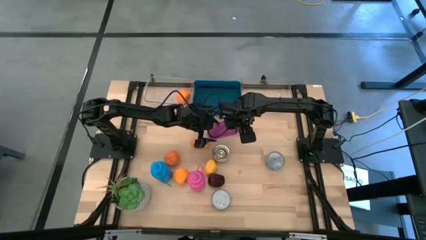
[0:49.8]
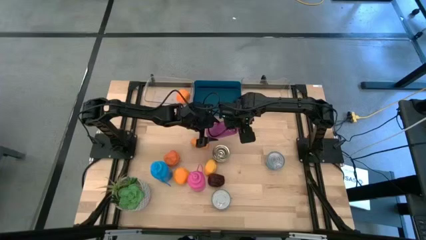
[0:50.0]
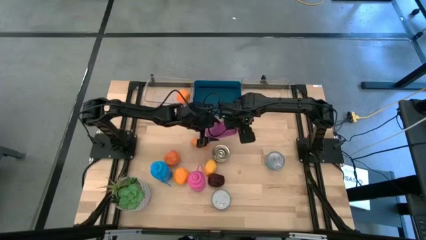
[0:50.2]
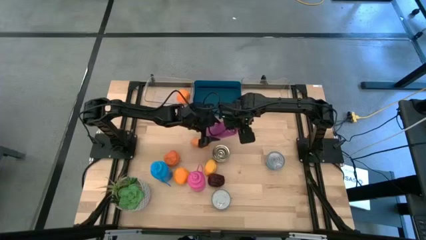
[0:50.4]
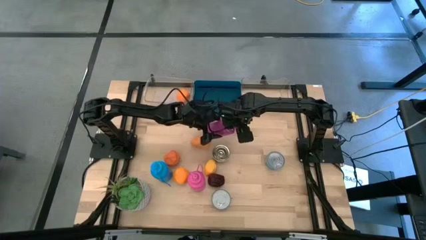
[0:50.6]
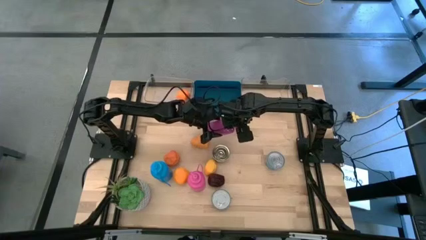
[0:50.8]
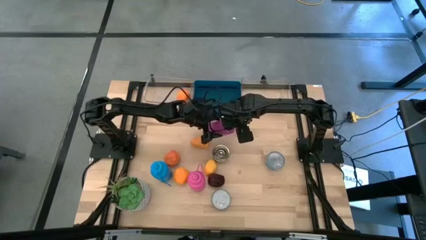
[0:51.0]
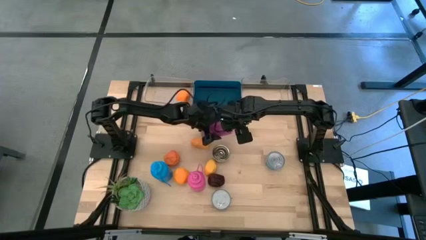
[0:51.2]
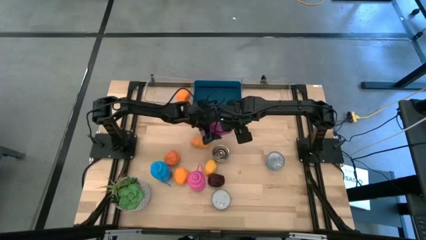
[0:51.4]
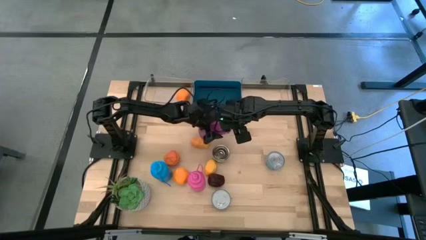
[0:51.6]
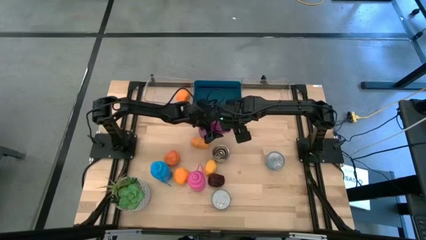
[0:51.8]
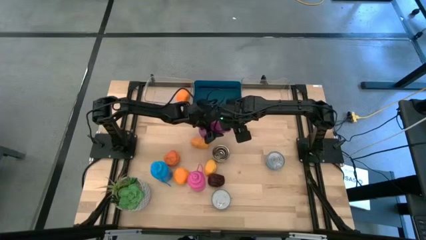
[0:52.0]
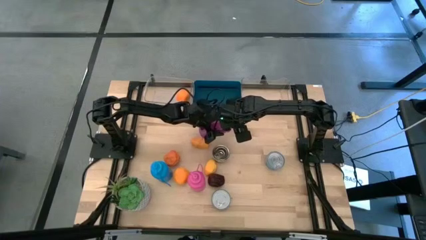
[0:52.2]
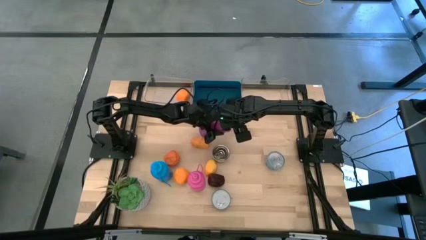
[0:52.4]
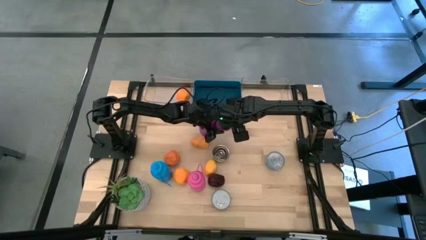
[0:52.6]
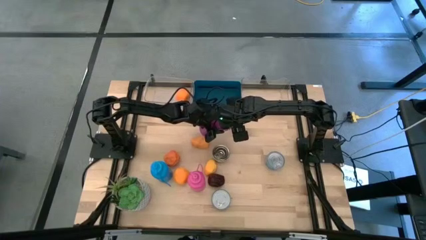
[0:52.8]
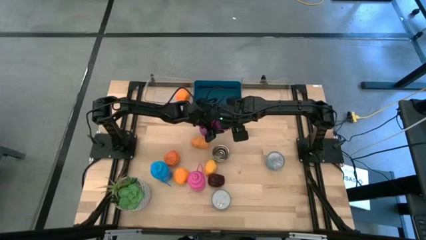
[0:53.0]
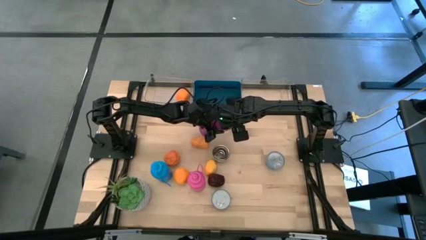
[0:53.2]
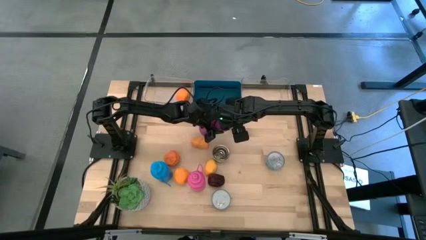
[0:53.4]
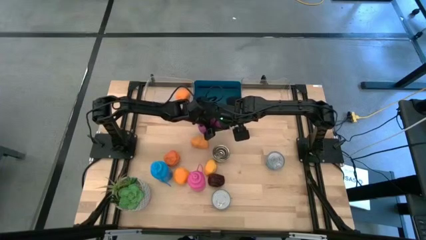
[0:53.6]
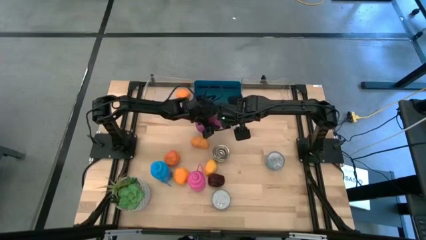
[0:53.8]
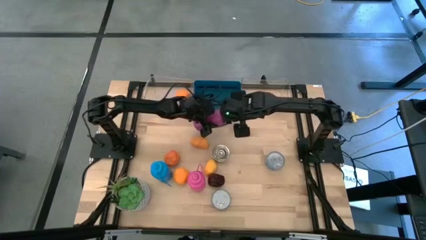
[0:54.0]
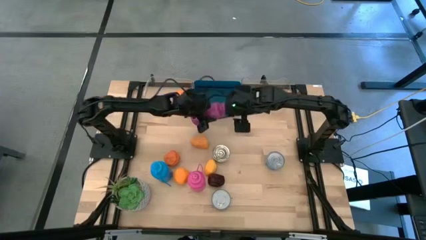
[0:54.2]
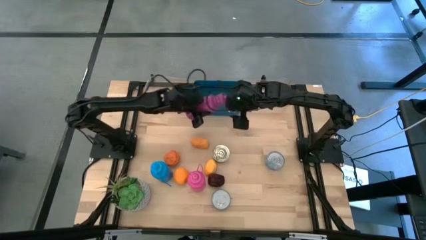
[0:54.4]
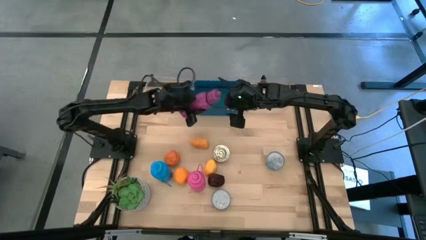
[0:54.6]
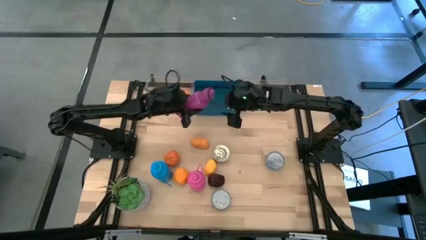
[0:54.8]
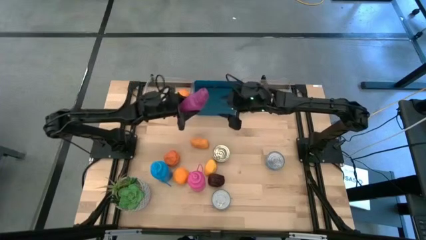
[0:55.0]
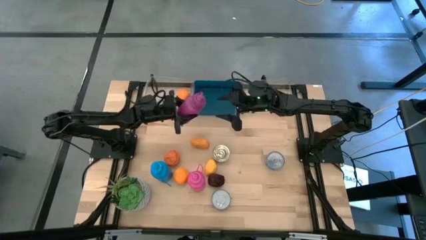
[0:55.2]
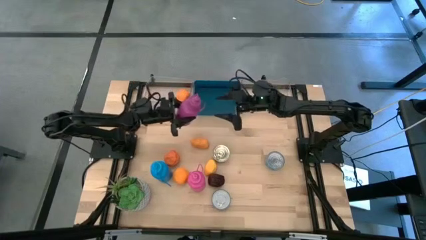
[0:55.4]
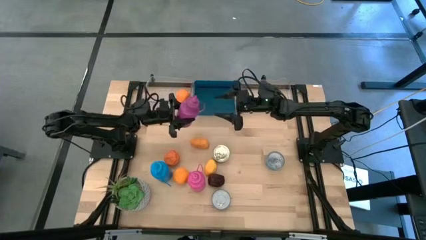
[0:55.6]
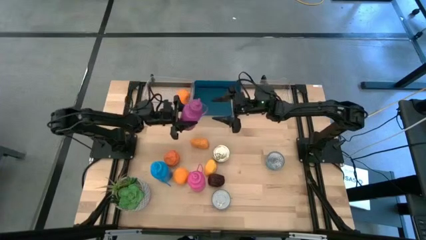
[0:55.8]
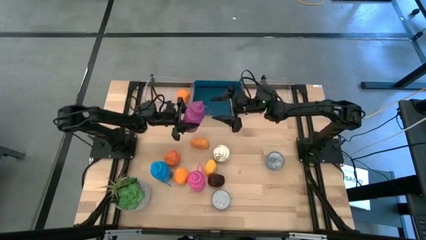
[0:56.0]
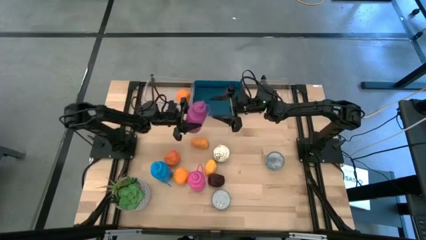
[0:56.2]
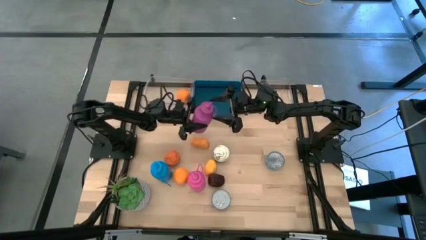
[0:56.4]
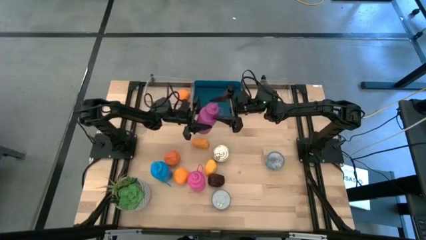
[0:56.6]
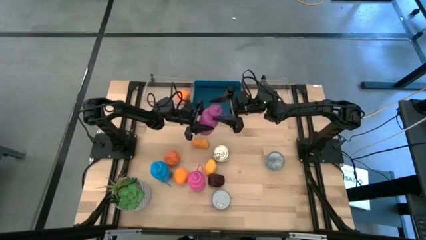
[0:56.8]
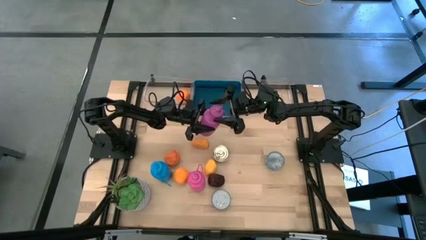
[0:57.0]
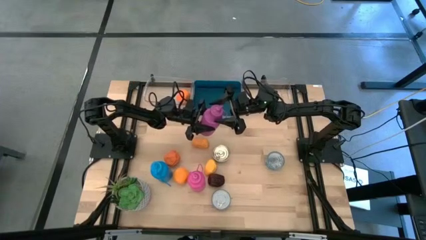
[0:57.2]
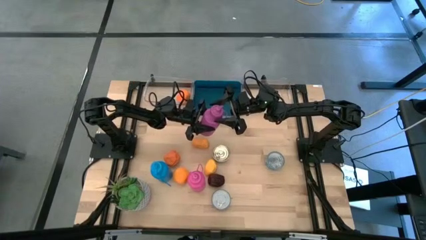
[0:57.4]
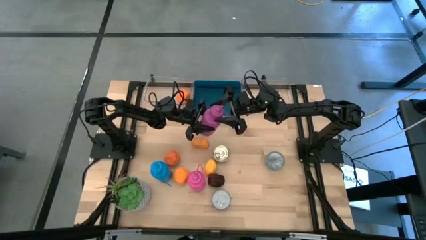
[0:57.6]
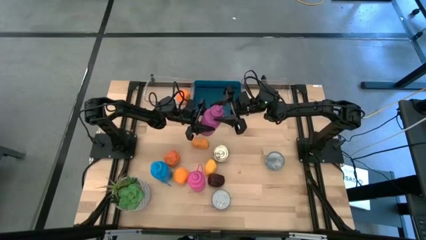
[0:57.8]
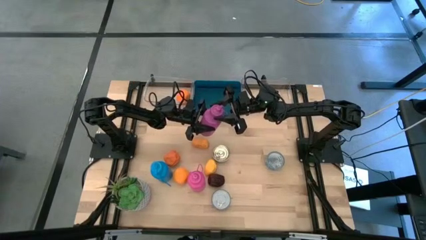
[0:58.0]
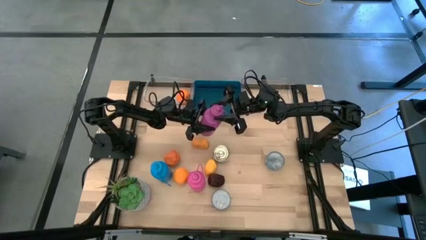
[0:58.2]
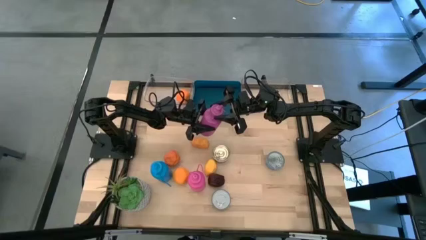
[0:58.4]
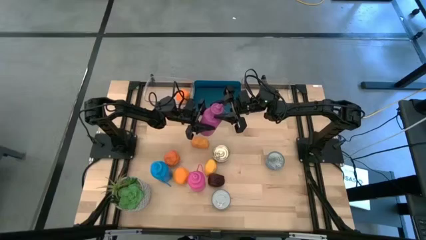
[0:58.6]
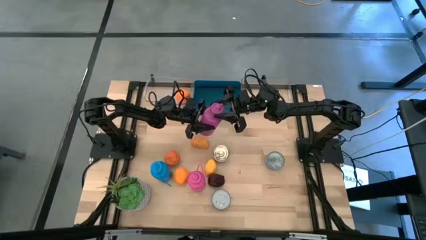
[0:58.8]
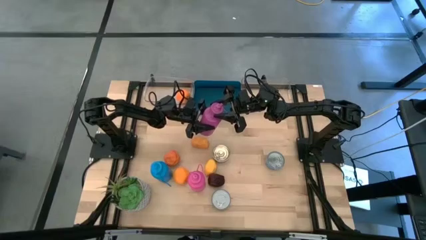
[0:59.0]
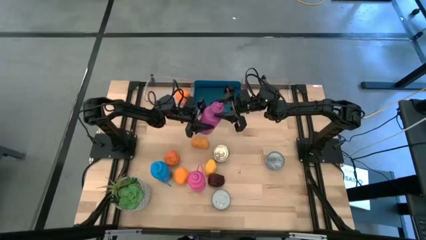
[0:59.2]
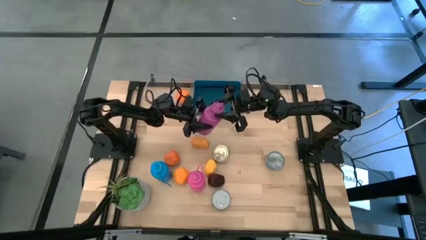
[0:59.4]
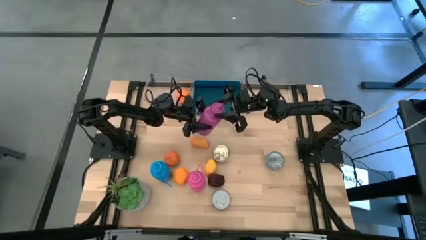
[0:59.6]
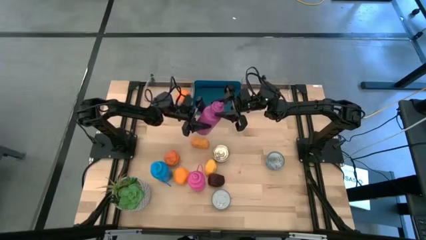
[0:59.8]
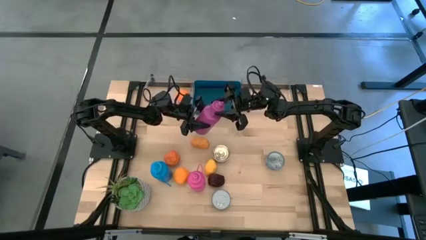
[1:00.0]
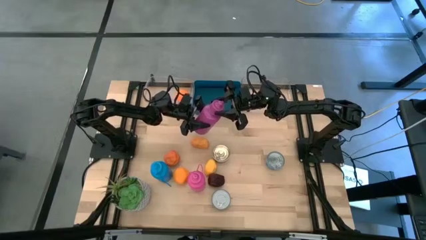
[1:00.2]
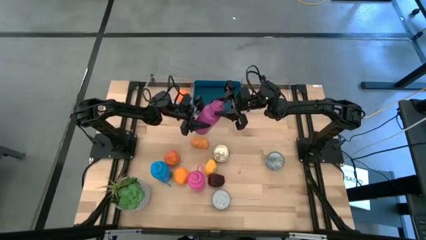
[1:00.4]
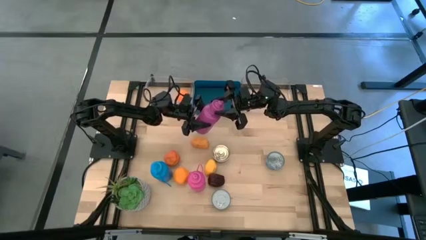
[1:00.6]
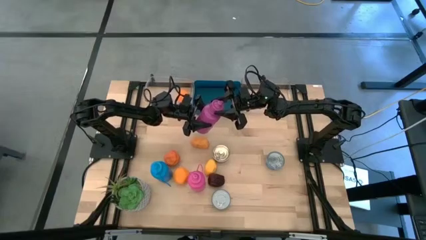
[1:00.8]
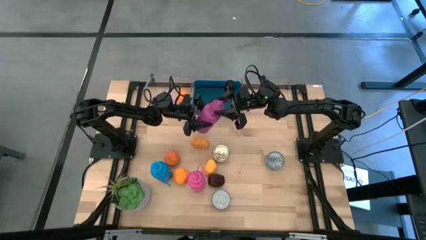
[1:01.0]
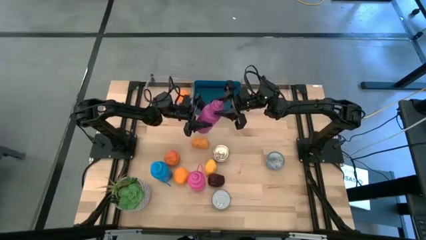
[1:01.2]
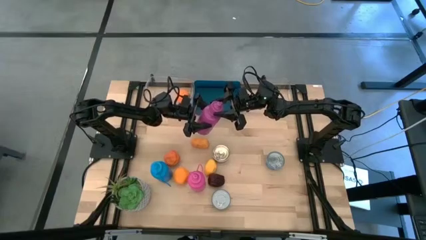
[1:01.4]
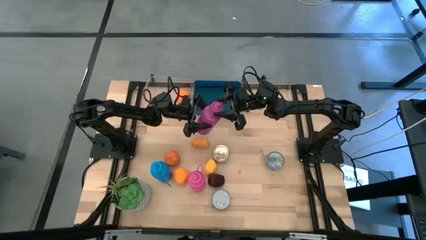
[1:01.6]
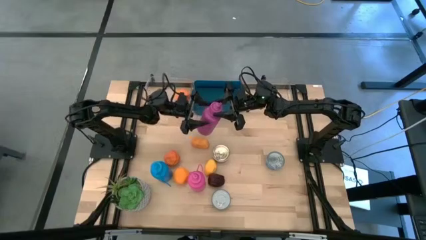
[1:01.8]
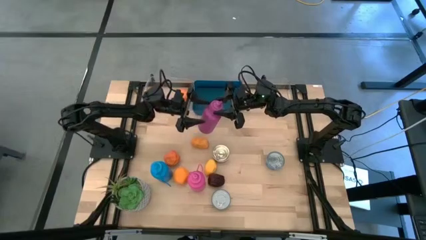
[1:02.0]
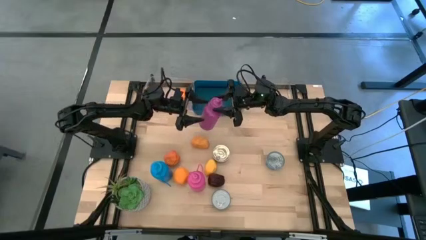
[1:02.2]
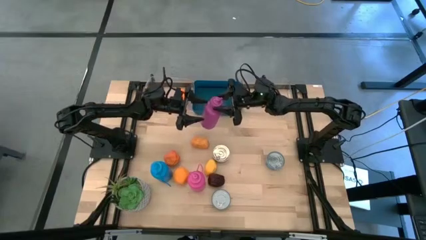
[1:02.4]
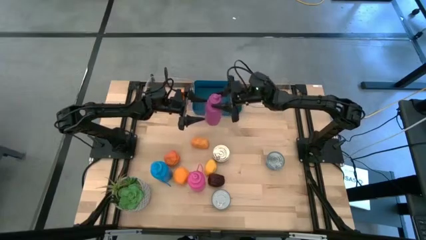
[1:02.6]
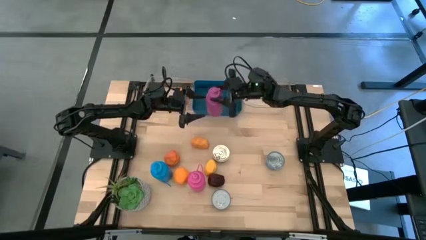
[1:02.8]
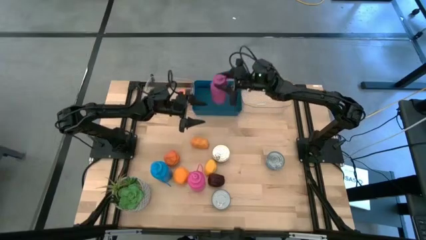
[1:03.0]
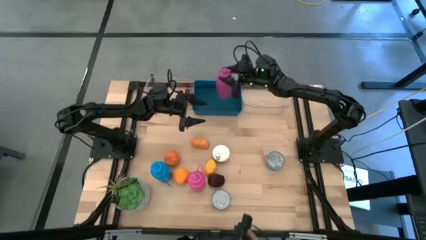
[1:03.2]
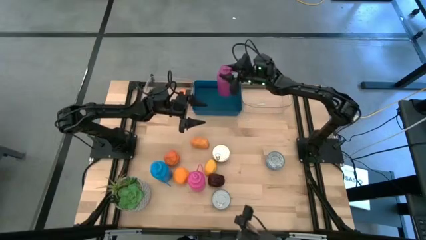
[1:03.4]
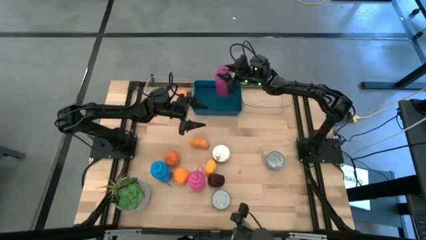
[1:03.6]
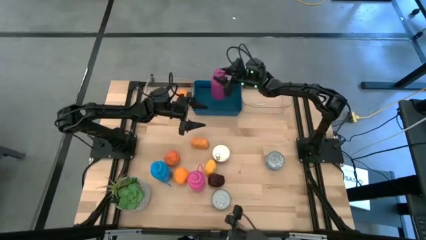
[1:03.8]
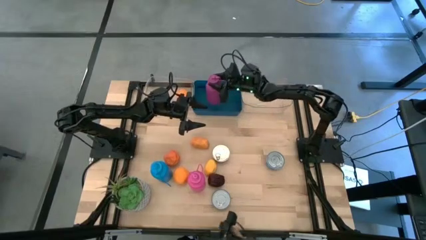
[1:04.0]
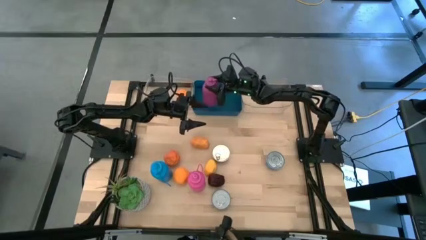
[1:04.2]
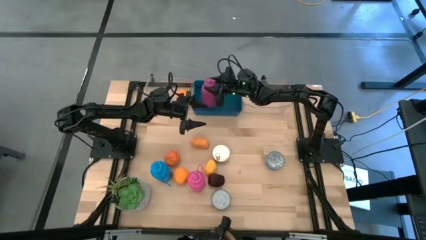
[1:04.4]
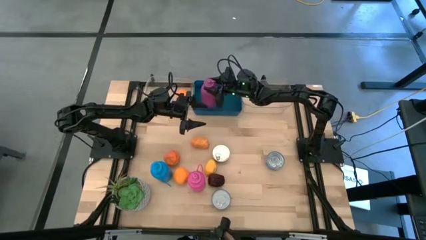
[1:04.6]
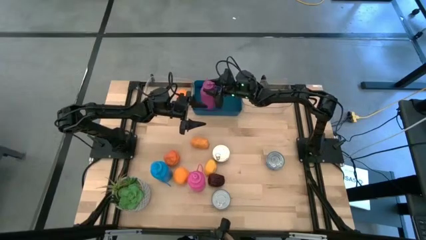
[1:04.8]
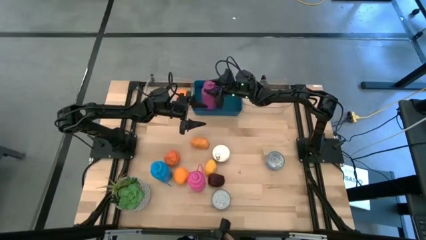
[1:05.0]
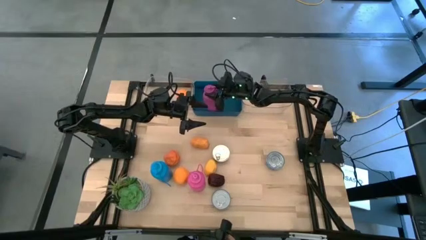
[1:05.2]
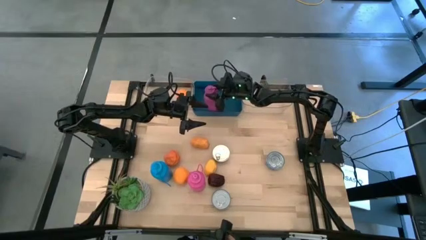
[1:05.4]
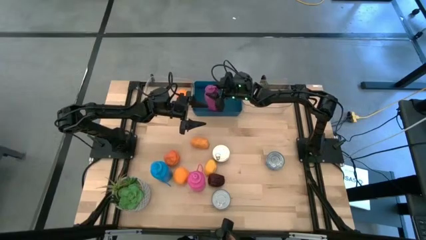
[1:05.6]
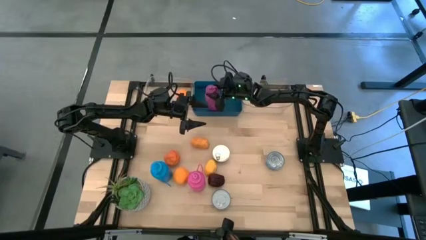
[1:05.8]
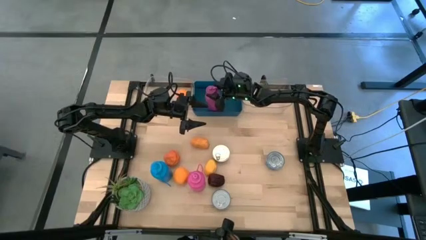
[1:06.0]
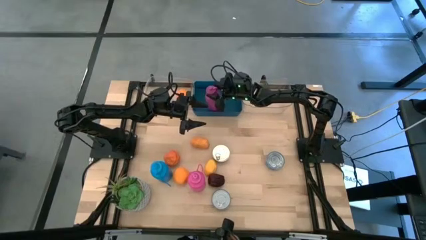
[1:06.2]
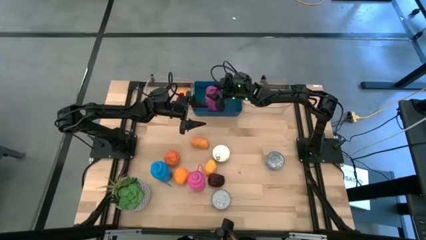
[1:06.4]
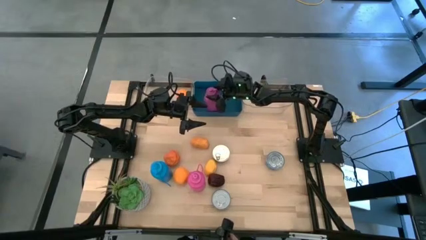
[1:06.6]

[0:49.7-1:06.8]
Task: Pick & Place Food Item
Put the violet water bottle into the blue bin
